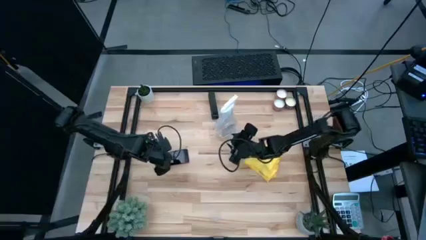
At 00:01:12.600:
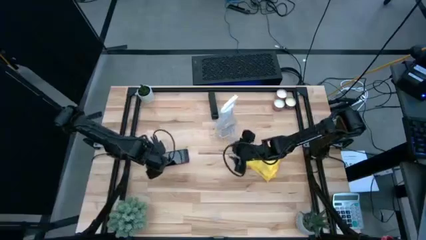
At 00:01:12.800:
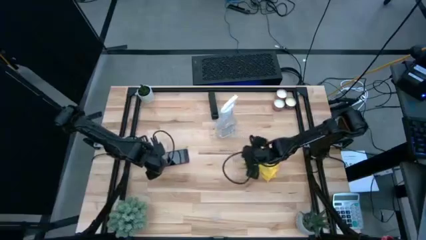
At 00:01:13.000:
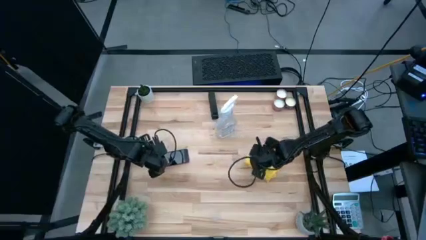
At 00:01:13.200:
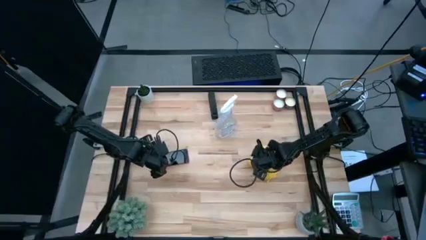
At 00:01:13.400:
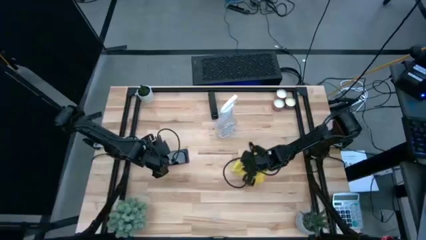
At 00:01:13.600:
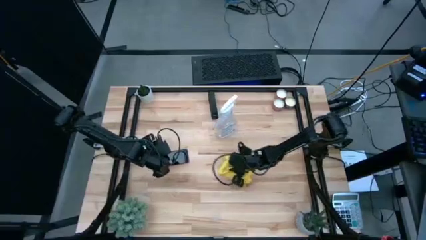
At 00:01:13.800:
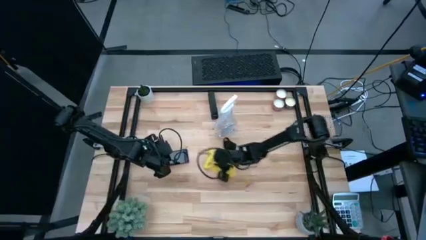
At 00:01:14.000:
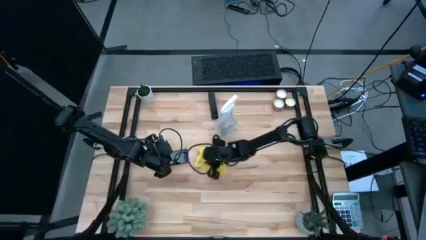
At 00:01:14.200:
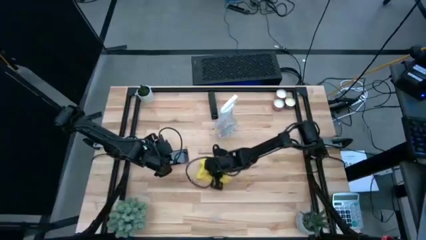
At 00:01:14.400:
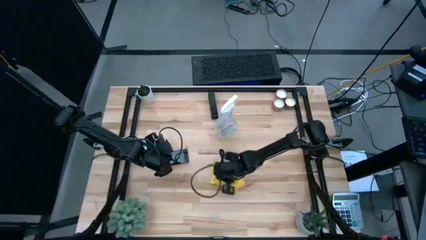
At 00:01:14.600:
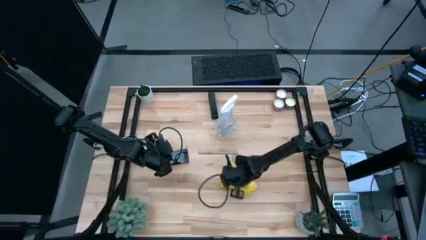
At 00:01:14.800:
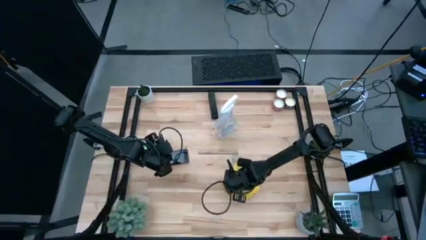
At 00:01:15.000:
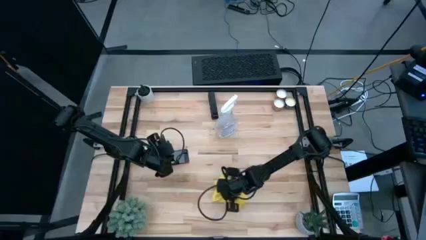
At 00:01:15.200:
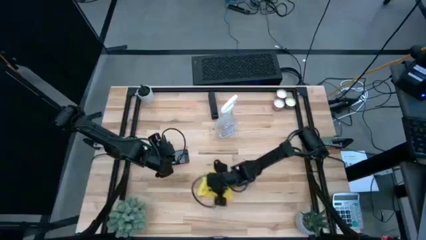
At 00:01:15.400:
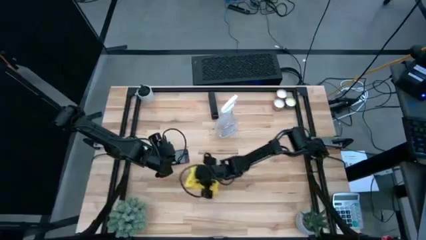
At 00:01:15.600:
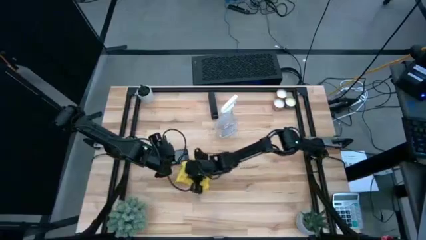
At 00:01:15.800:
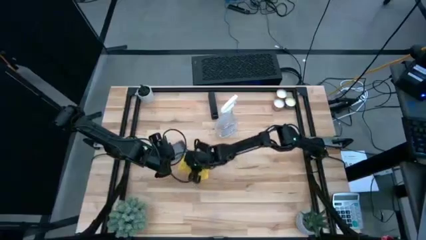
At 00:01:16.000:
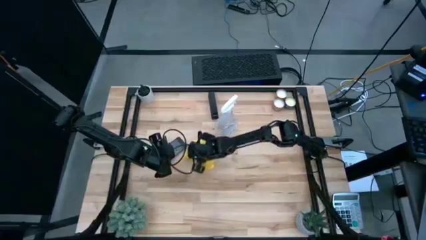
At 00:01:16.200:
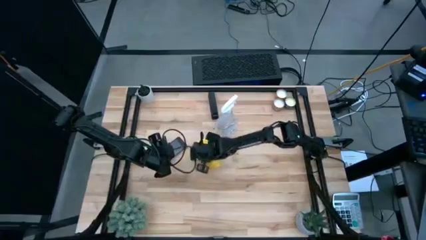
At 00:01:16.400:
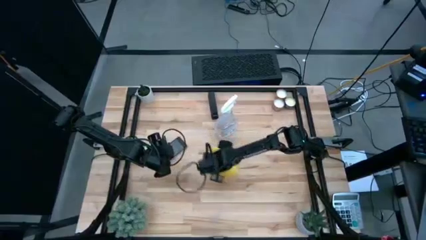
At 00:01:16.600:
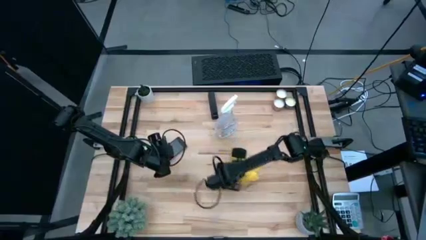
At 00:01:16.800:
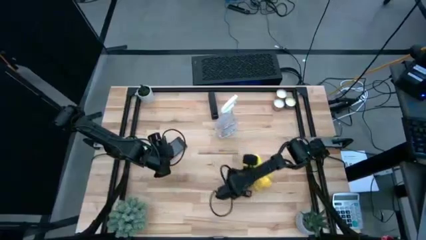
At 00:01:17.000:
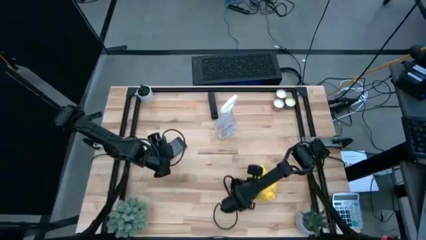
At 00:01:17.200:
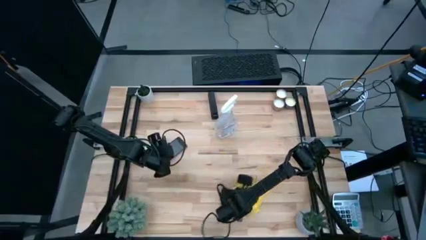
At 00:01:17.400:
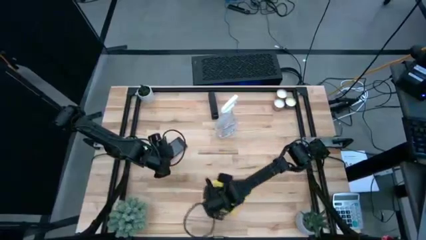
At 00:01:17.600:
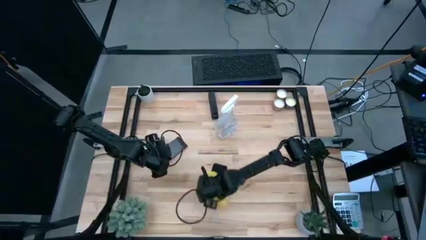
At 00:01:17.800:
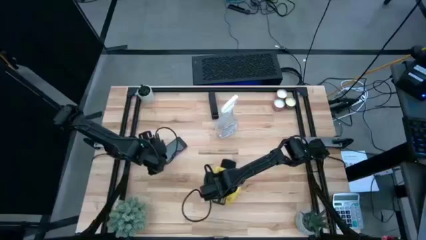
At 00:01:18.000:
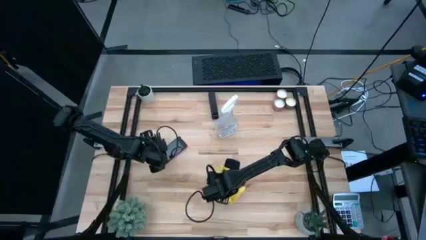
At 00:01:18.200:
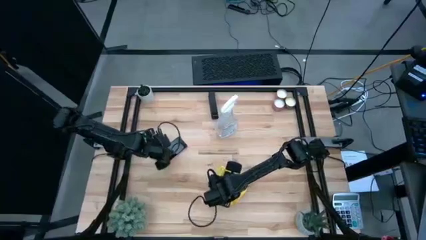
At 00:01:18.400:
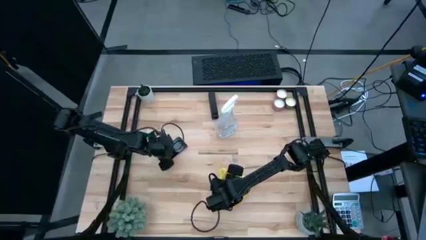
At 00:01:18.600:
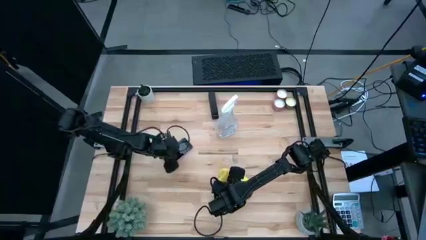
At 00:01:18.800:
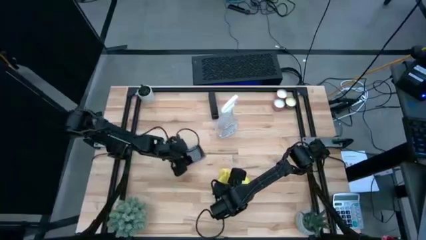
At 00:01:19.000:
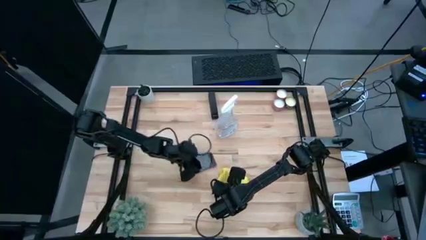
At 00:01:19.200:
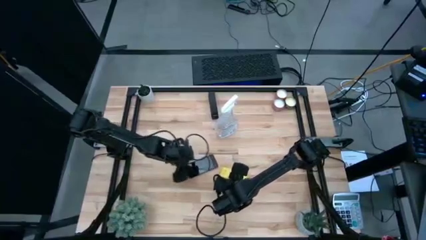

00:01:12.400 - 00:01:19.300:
Task: Apply microfiber cloth
Wipe the table with a yellow microfiber cloth

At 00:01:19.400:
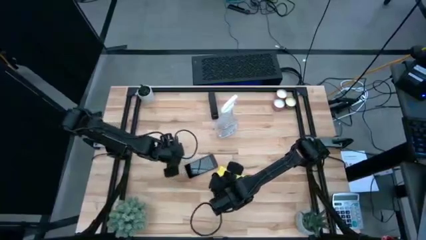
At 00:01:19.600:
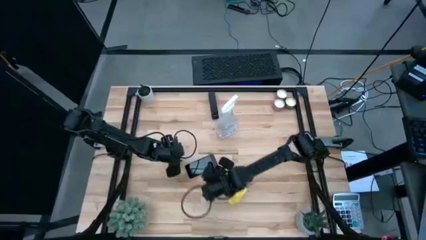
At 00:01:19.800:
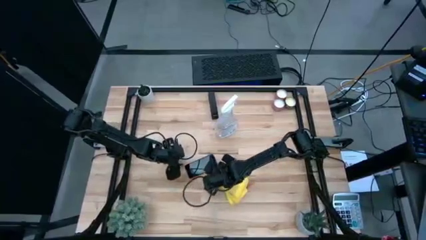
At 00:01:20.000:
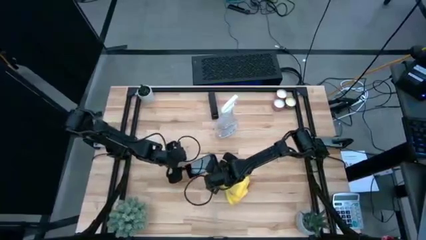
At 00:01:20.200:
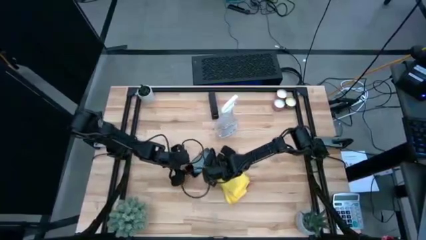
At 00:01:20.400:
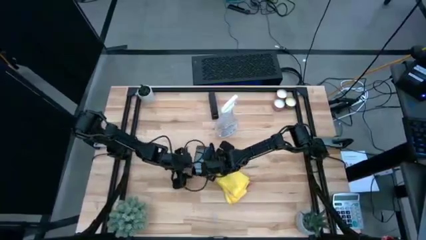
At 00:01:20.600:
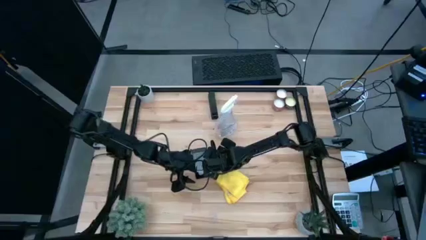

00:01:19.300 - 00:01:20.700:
Adjust the cellphone on the table

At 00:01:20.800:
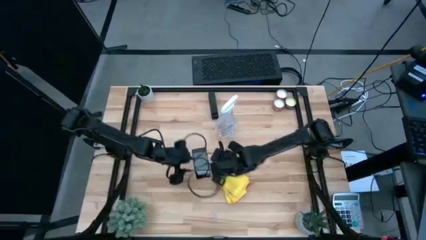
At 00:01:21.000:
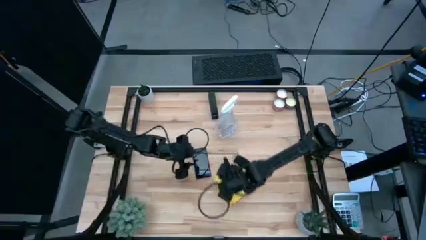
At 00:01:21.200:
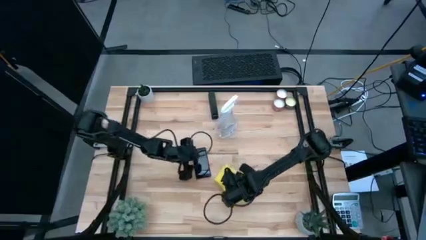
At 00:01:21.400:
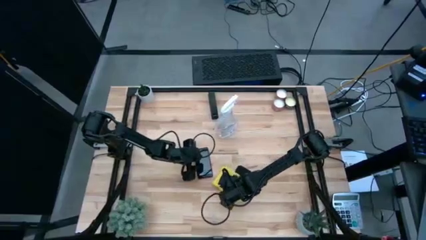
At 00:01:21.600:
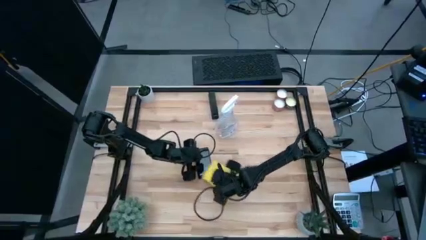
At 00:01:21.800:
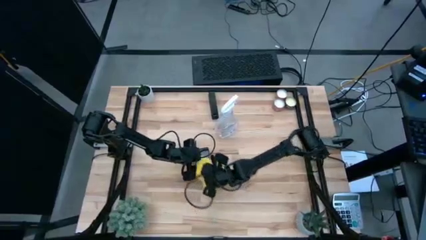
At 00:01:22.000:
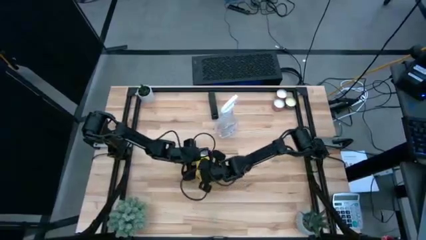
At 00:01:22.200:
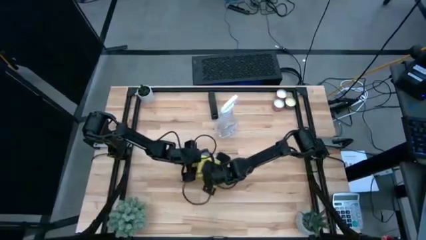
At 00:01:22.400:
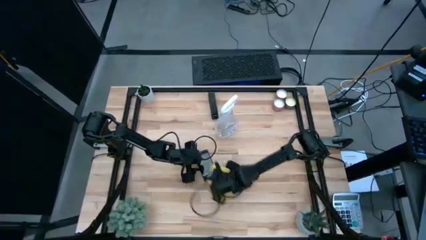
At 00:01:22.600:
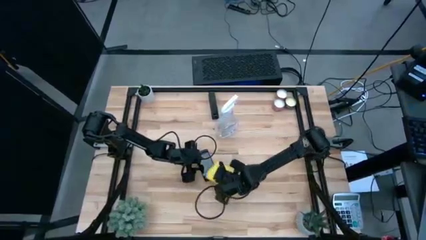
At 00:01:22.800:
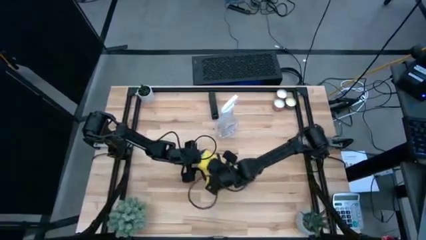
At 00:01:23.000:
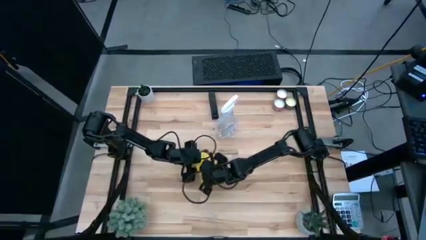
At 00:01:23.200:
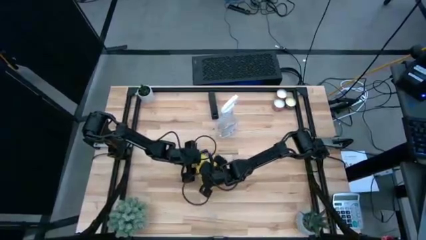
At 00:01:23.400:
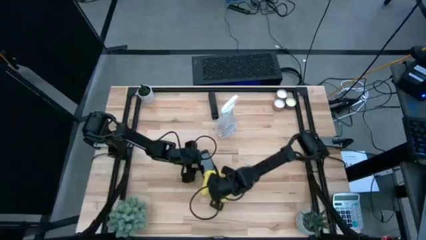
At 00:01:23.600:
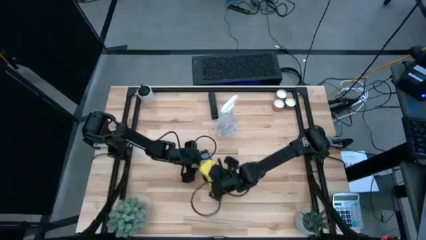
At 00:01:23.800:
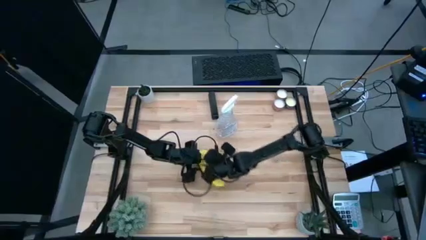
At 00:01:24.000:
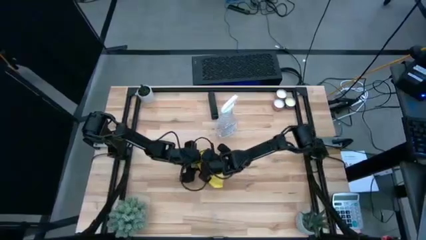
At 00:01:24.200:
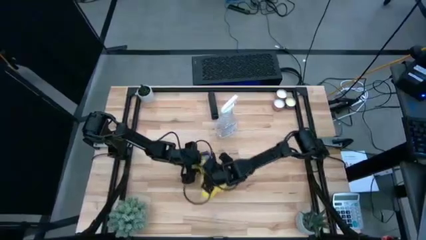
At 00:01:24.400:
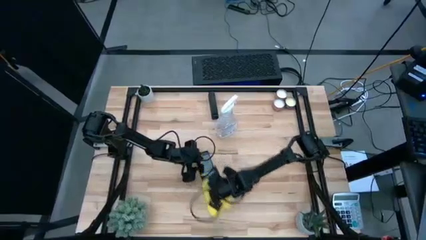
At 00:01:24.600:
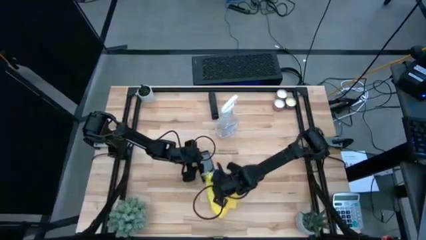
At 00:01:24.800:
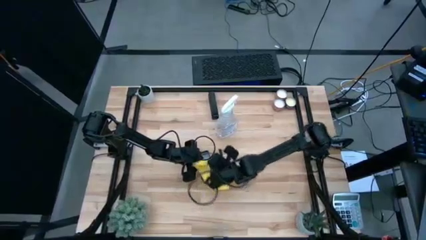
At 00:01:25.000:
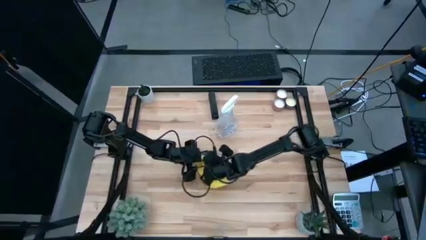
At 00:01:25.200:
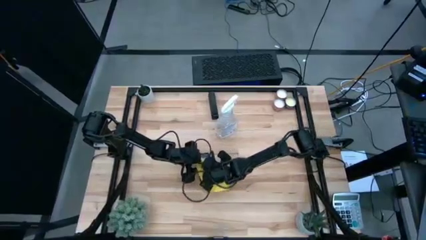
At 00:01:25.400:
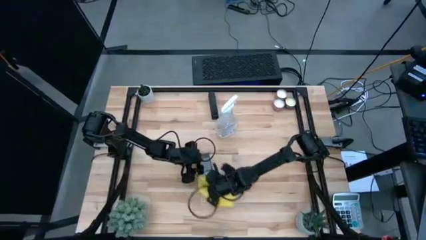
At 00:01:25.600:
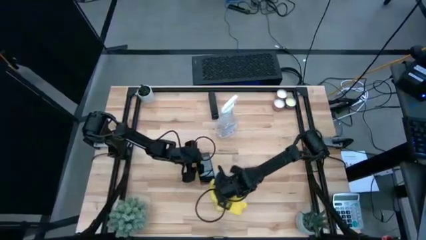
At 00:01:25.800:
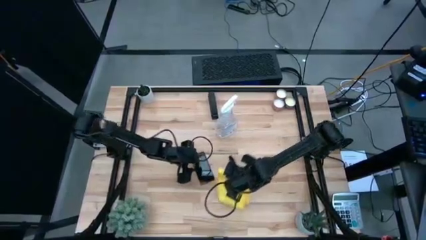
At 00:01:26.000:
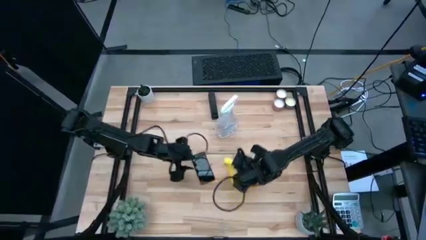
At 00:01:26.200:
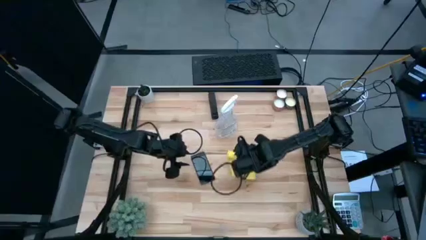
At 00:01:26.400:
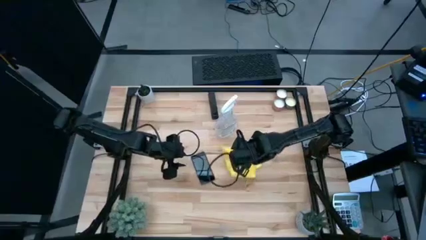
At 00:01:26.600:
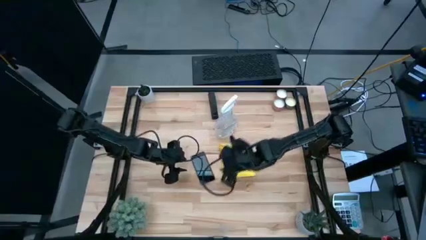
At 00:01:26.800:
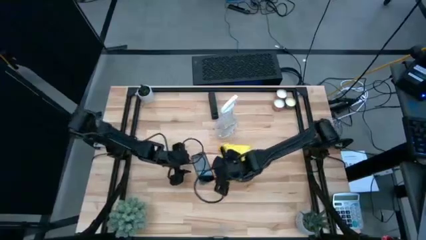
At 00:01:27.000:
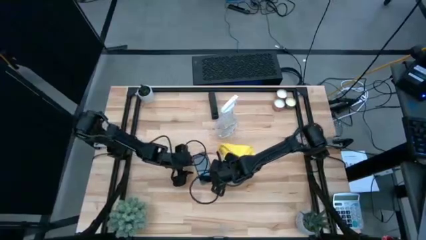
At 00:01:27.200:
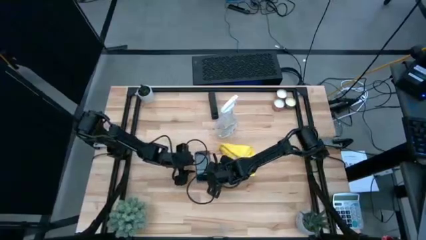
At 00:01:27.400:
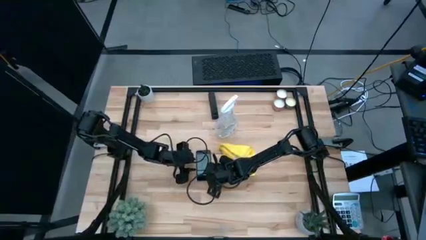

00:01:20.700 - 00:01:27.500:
Wipe the cellphone with a yellow microfiber cloth
